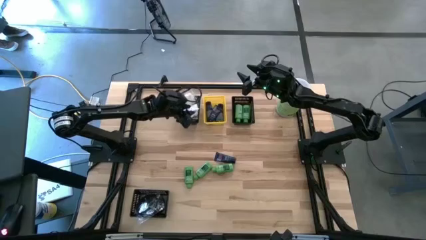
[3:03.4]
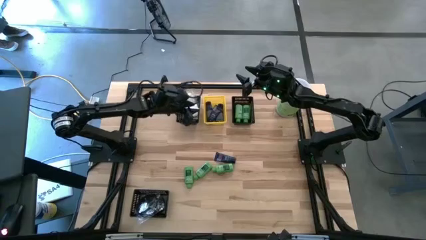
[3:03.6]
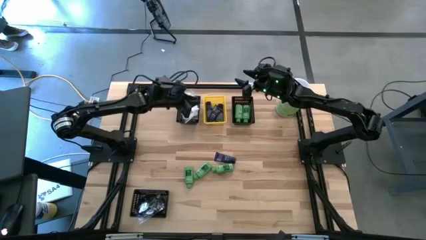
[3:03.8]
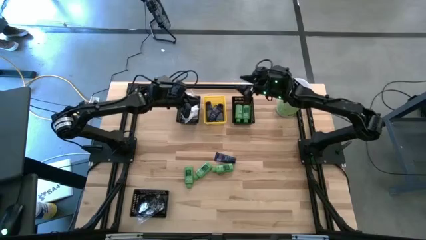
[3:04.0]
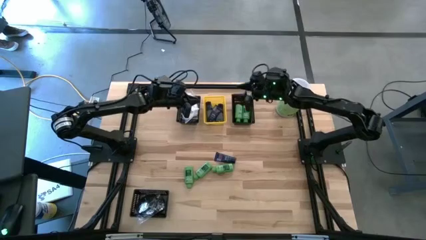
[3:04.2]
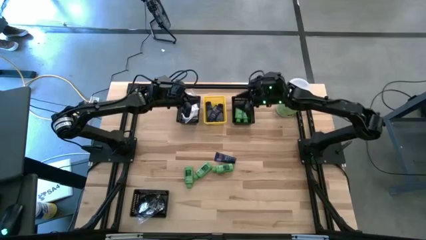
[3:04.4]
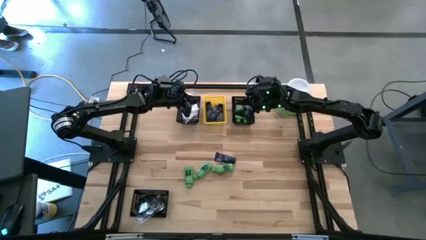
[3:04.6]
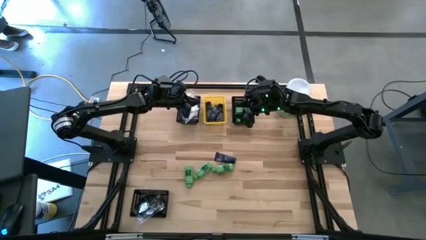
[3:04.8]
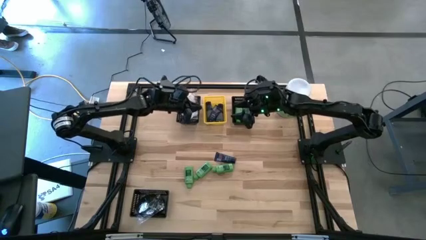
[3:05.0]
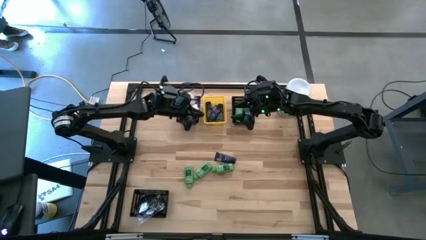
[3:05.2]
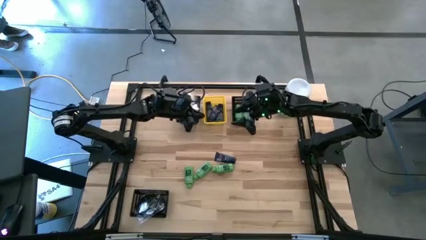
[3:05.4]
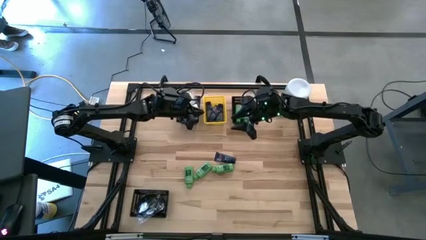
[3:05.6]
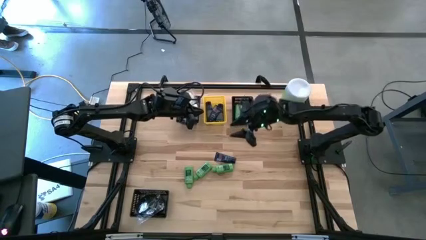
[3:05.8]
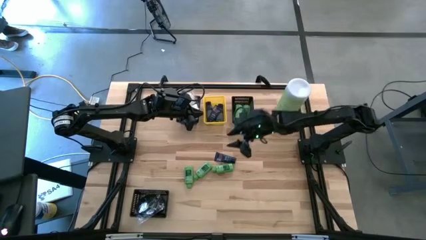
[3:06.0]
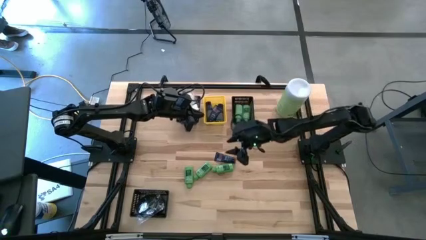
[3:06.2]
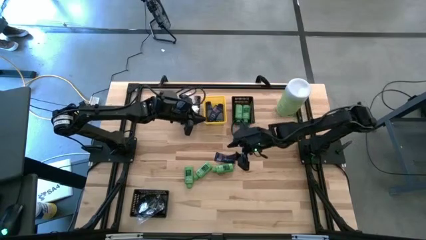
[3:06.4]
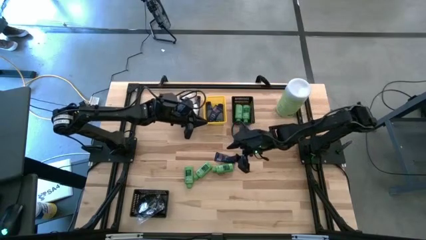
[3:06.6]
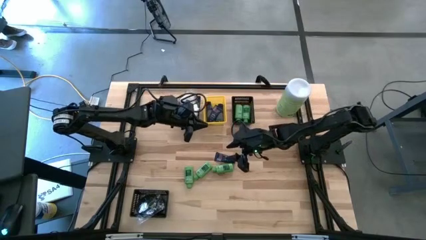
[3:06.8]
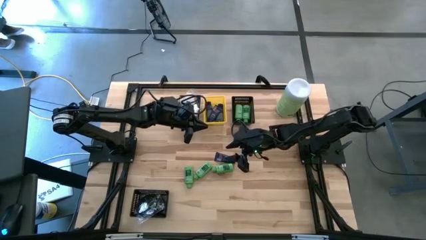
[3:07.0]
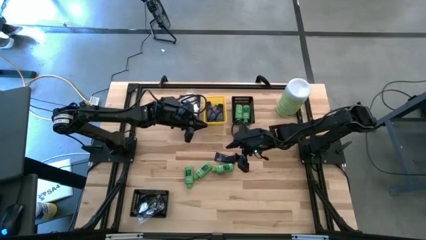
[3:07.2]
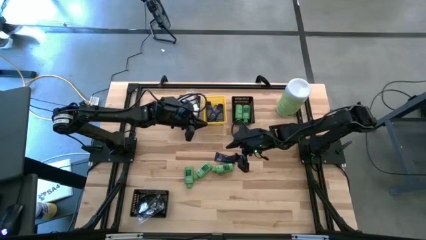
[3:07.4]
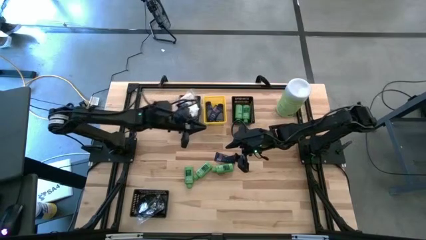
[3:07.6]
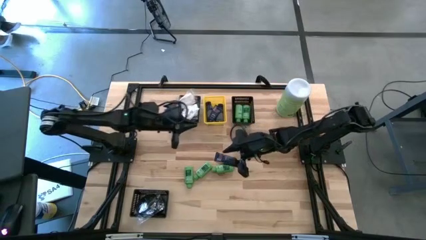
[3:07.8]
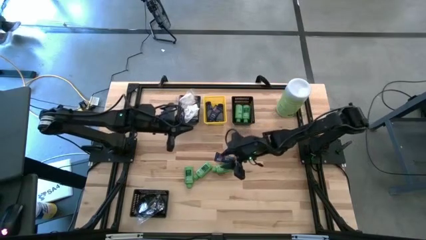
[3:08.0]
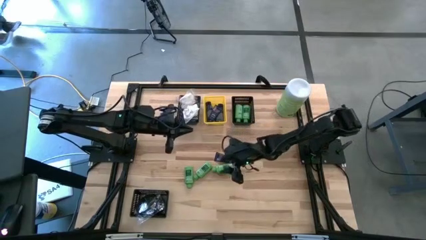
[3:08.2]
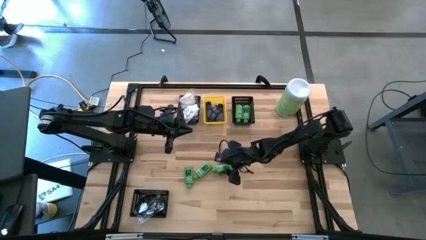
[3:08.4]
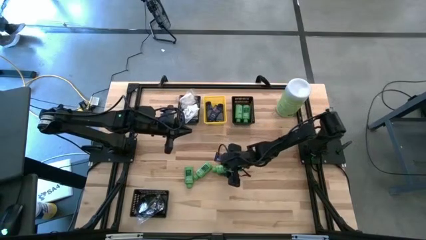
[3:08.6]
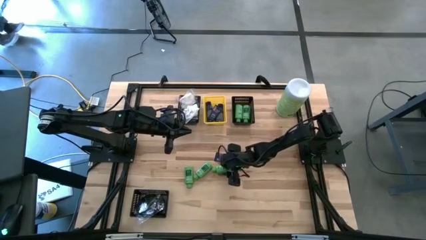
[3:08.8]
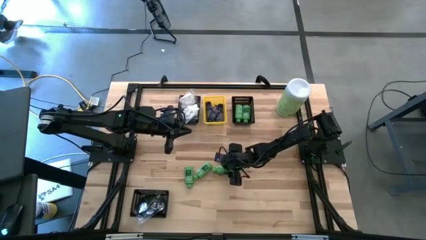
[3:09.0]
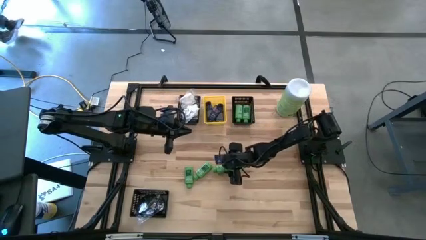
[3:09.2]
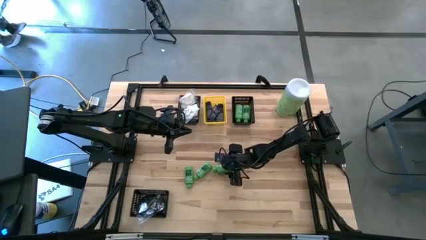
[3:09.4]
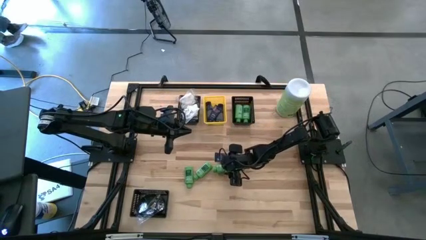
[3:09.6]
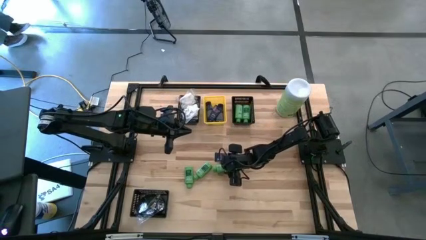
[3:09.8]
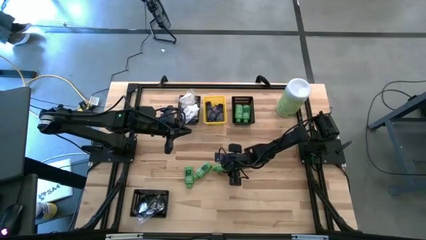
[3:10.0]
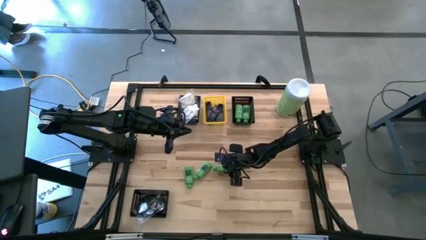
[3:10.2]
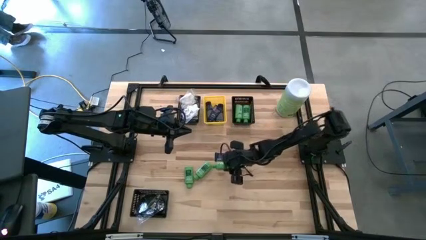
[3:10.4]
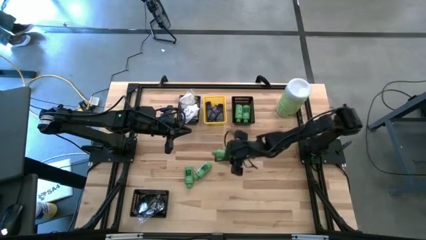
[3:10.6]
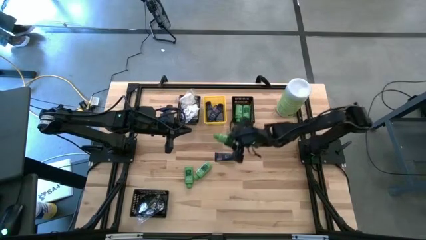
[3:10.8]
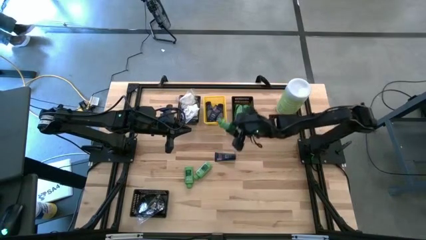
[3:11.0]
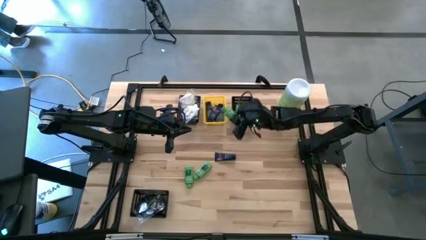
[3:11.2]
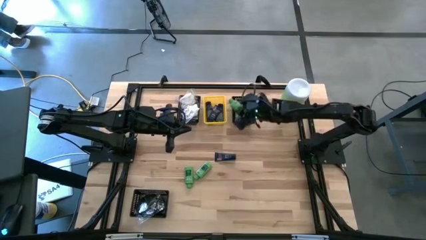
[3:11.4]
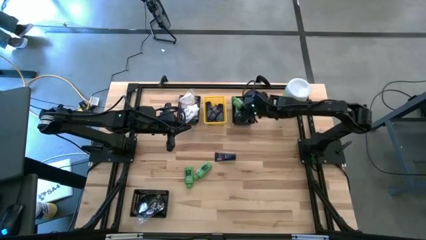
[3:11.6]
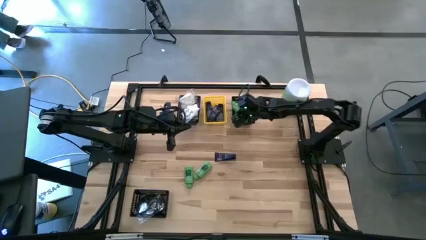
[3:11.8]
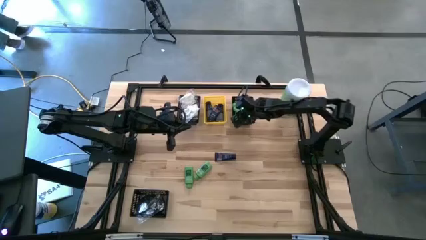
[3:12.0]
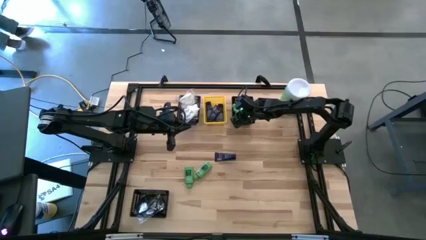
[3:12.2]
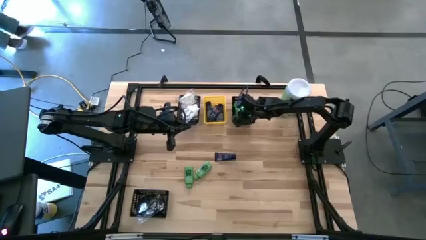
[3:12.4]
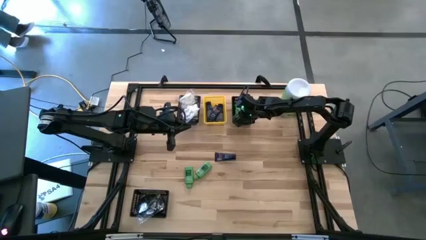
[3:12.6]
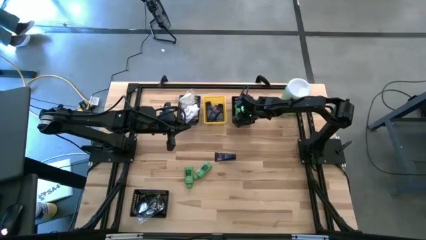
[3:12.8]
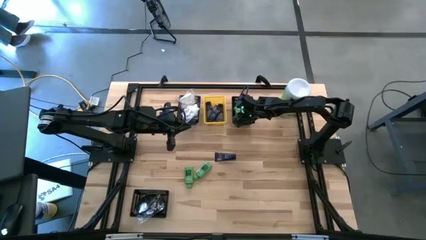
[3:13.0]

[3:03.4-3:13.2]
Task: Pick & Place Travel size toiletries
Put the green shampoo bottle into the top right black bin

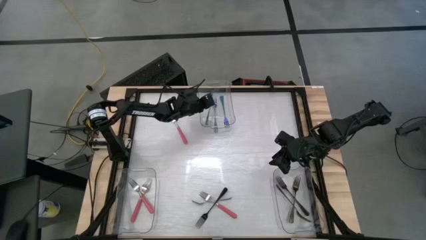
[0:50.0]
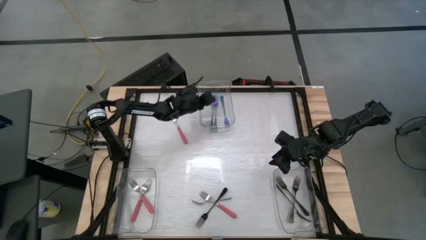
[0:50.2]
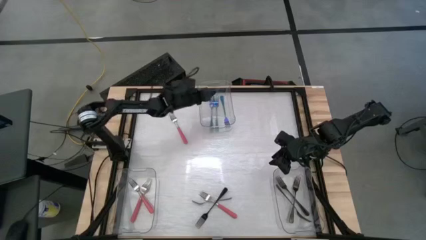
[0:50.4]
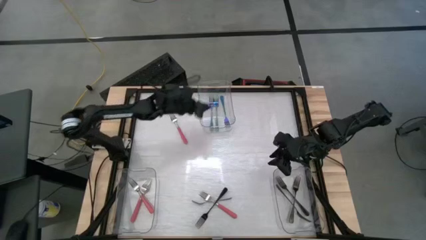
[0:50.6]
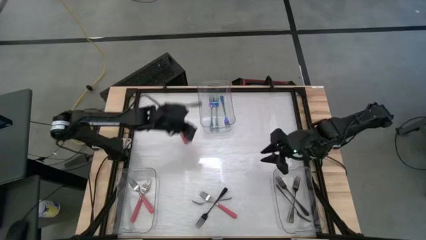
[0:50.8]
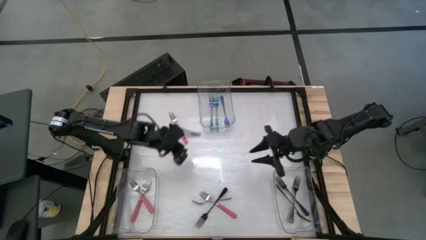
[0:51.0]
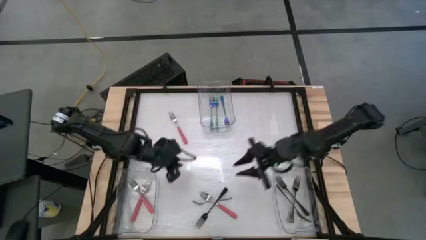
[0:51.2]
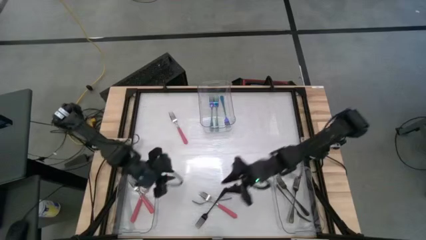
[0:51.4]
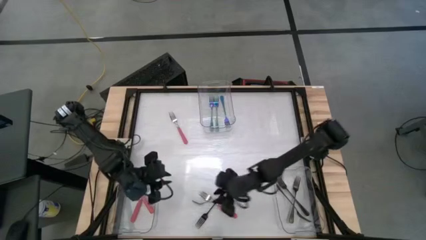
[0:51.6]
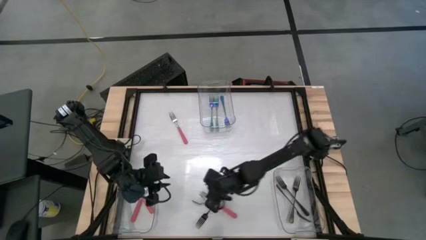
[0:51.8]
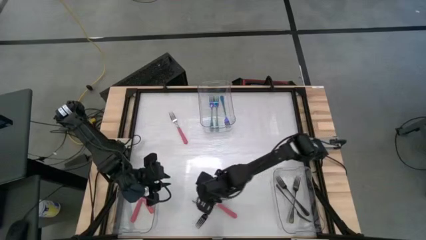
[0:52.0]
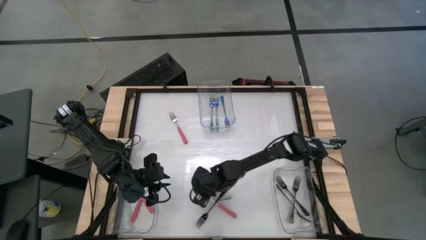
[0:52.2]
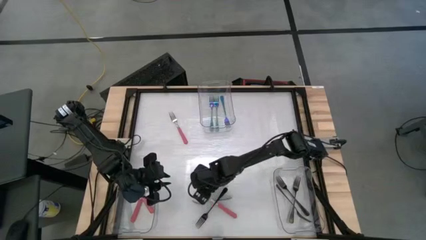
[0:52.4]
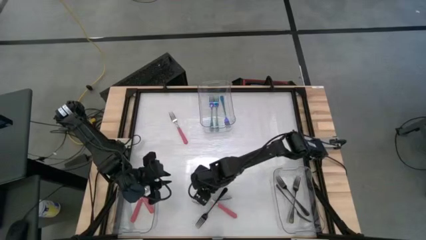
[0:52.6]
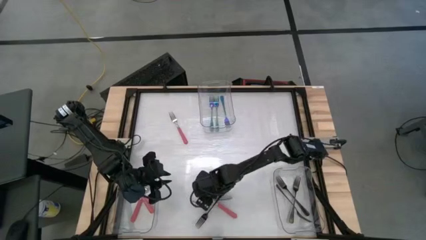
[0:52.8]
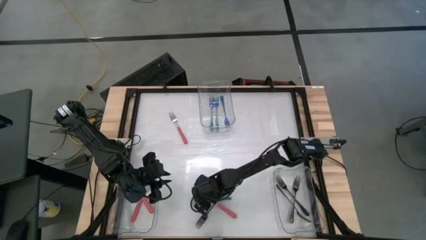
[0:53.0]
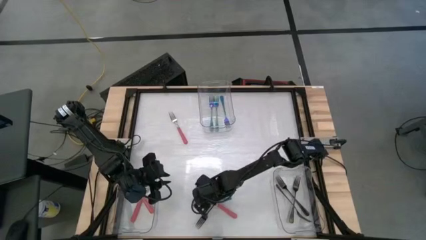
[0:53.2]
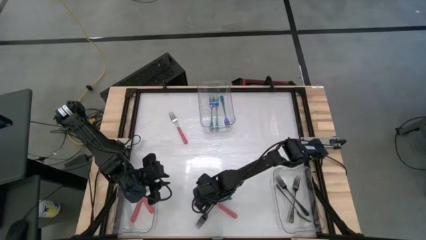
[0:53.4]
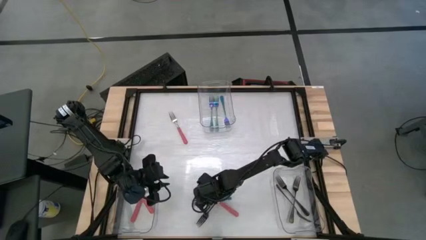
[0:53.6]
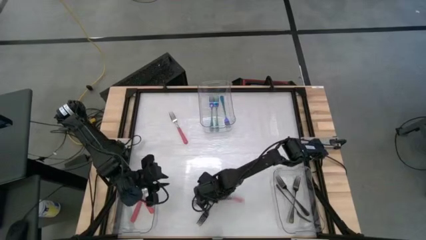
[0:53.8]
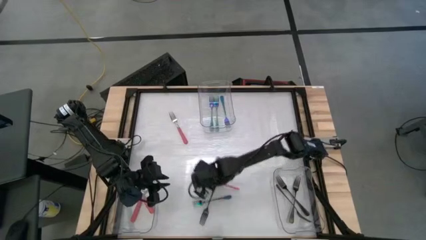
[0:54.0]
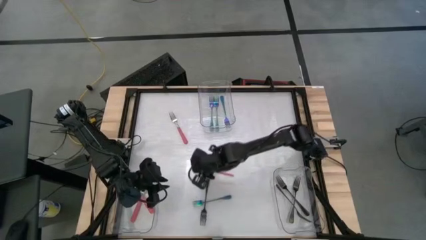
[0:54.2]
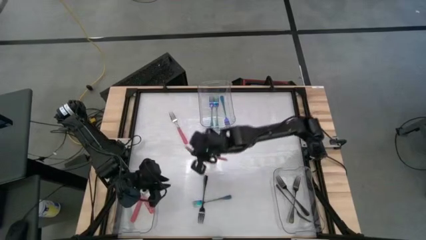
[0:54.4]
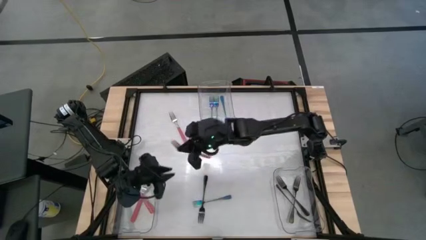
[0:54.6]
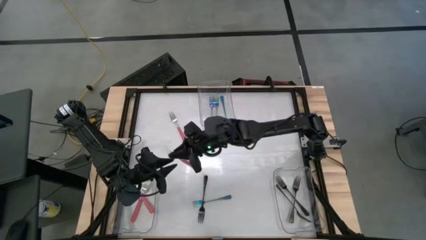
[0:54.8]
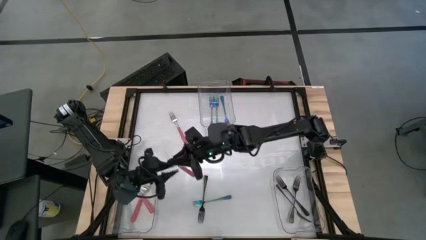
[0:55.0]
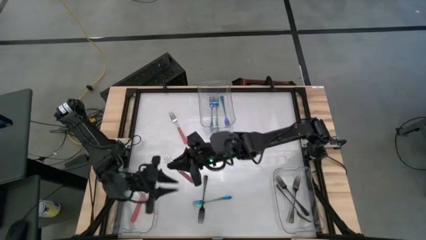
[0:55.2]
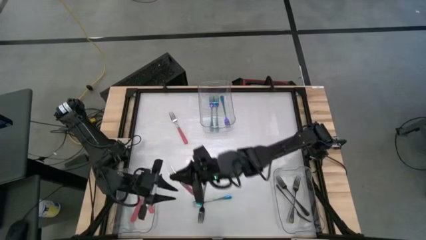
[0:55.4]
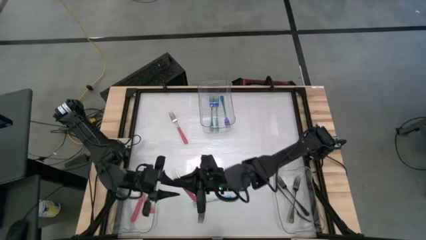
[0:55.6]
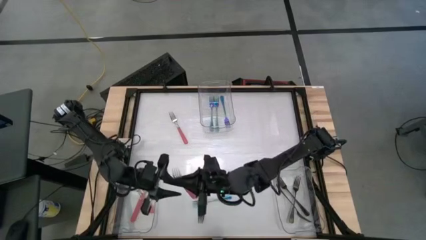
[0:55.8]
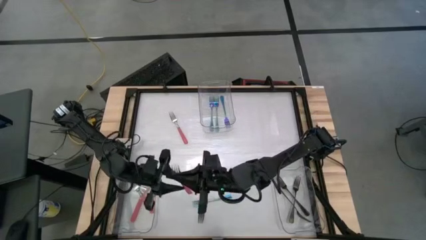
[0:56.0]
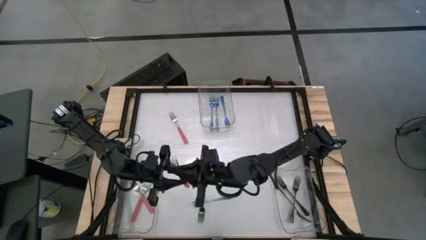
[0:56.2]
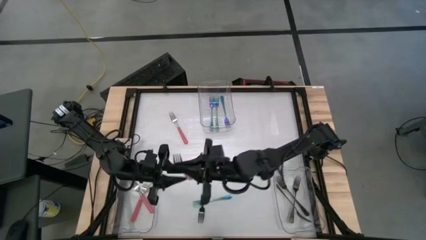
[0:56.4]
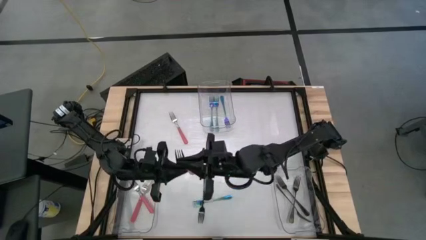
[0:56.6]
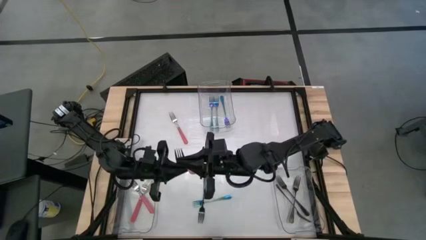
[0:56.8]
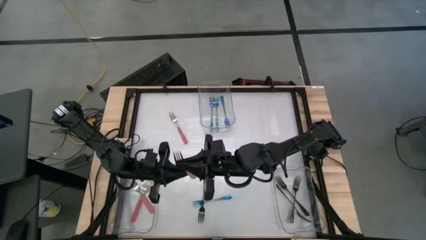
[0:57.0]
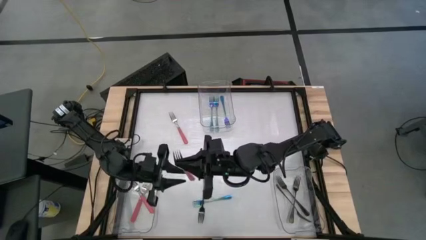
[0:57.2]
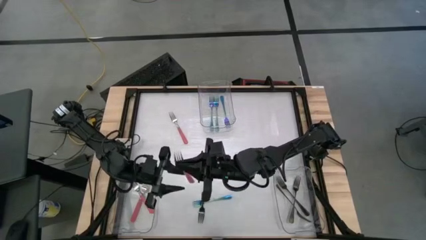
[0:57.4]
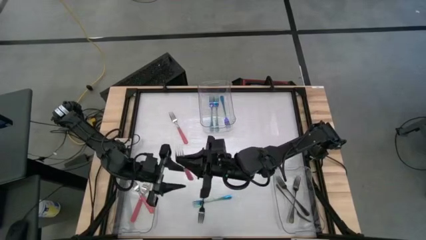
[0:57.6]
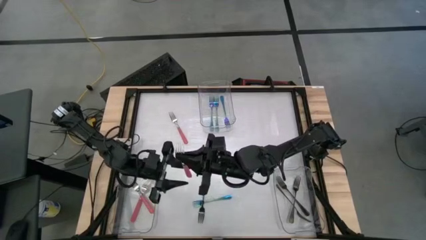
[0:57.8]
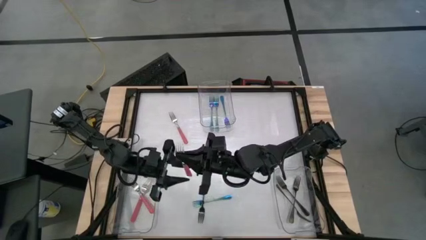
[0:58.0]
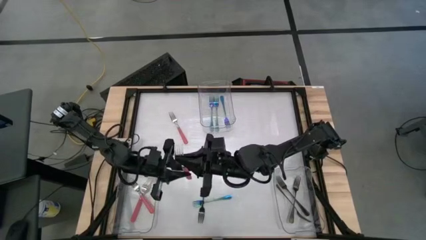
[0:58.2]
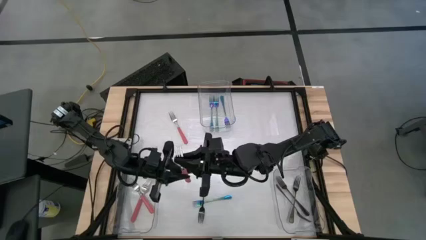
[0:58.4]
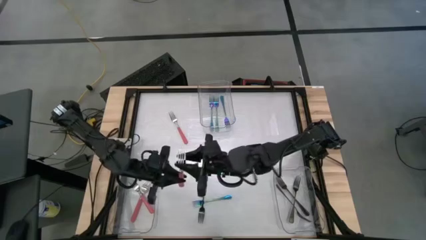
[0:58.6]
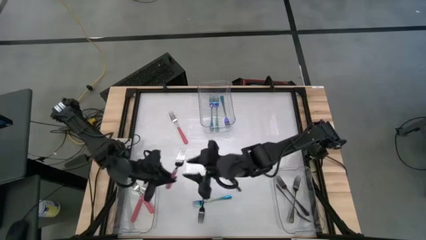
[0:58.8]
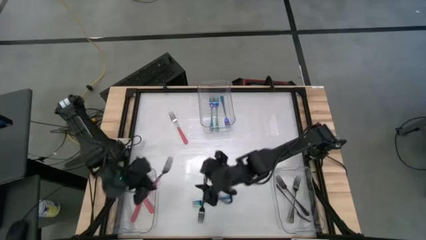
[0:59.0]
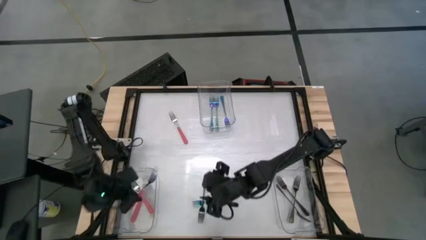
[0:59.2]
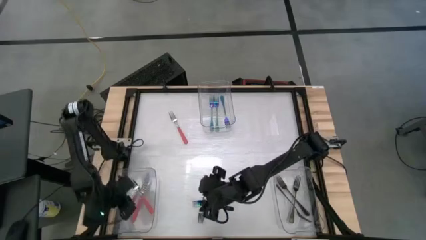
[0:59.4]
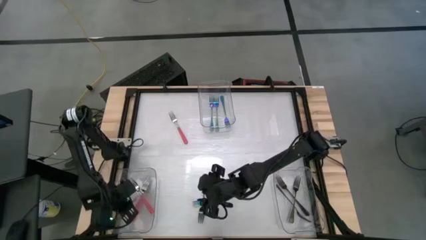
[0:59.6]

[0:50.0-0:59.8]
Task: Sort silverware by color (type)
Put the pink fork into the bottom left transparent bin
